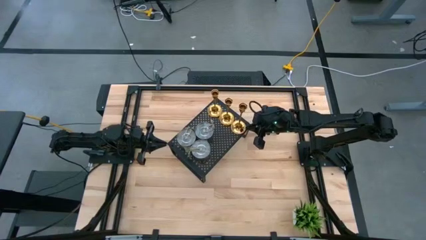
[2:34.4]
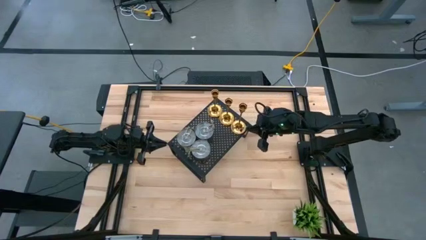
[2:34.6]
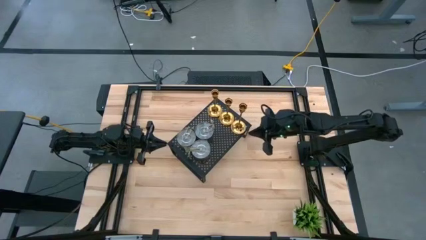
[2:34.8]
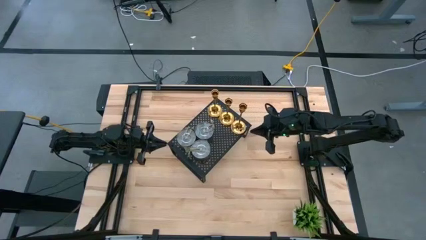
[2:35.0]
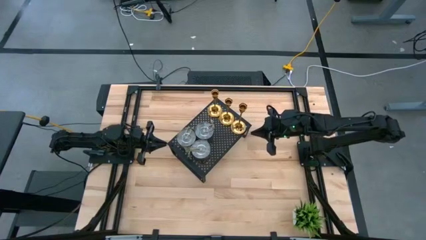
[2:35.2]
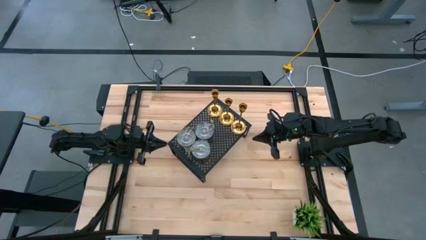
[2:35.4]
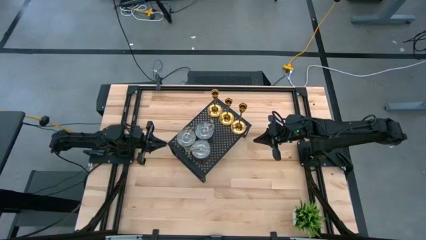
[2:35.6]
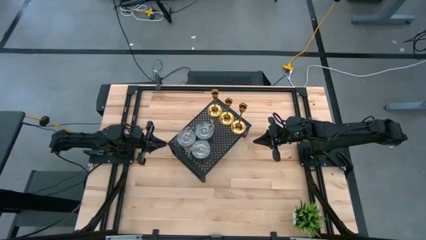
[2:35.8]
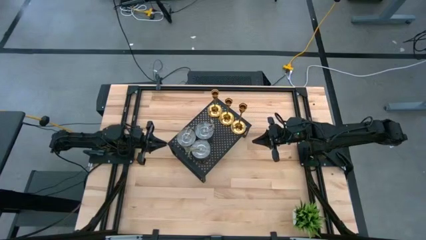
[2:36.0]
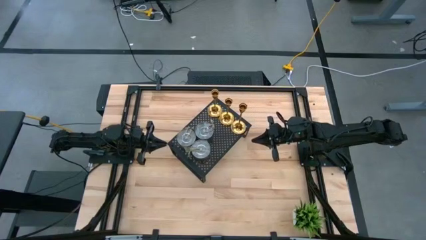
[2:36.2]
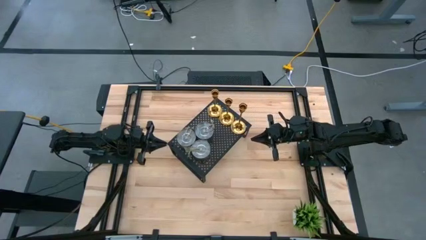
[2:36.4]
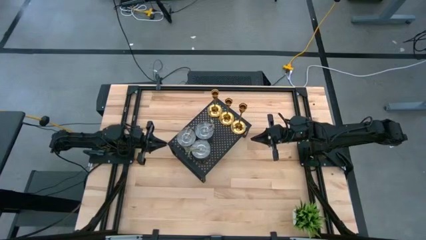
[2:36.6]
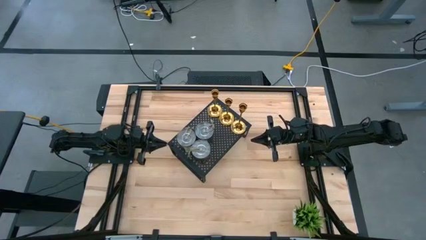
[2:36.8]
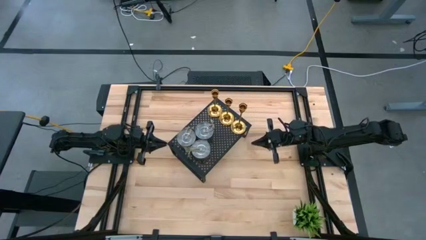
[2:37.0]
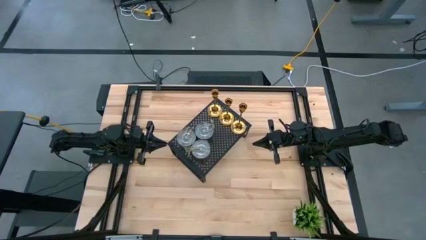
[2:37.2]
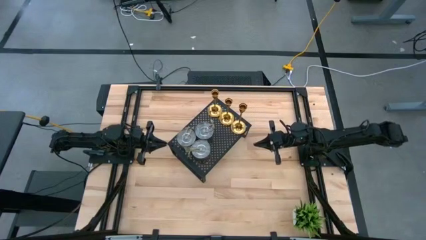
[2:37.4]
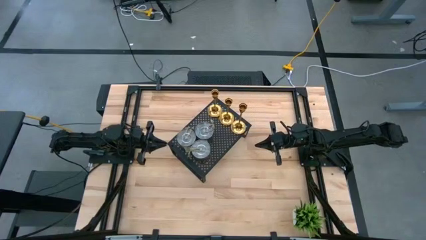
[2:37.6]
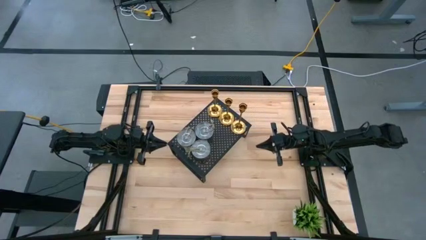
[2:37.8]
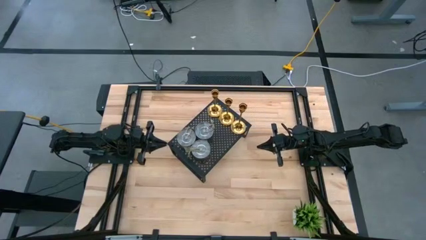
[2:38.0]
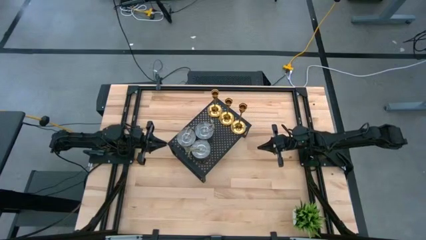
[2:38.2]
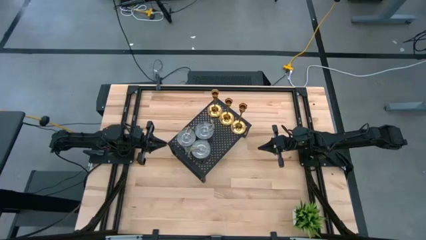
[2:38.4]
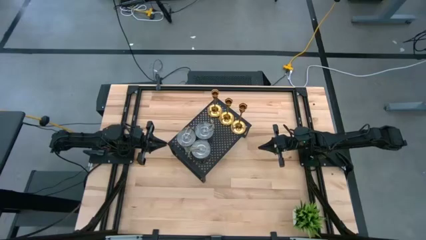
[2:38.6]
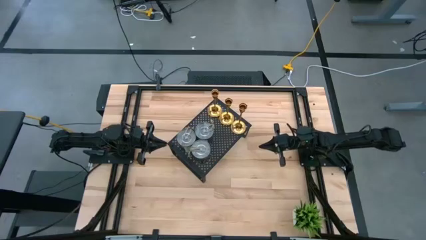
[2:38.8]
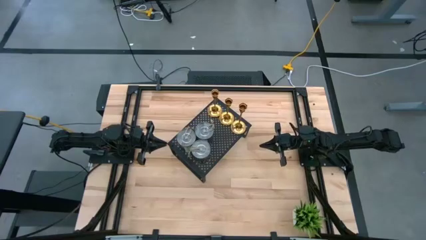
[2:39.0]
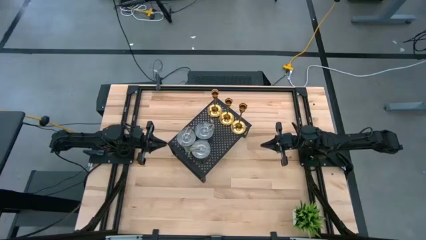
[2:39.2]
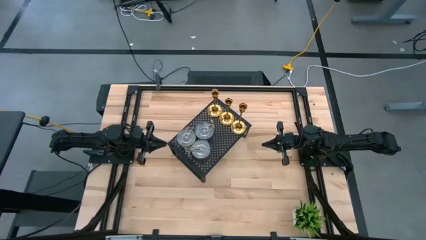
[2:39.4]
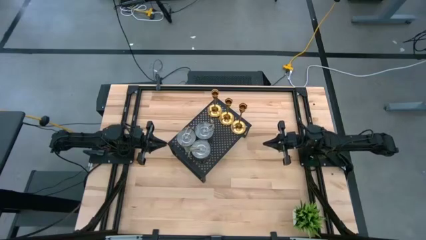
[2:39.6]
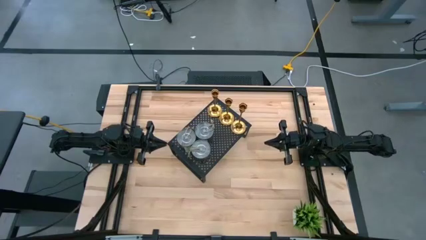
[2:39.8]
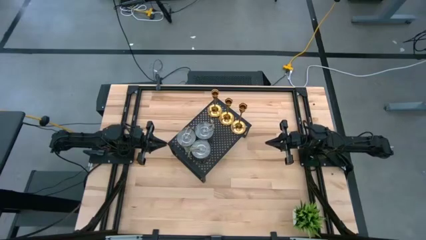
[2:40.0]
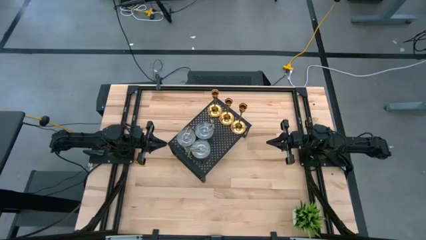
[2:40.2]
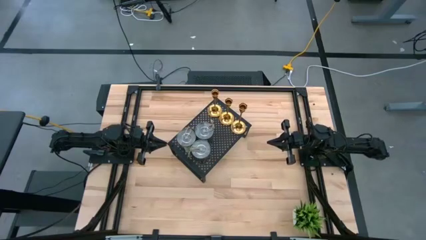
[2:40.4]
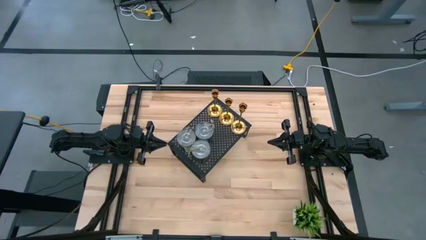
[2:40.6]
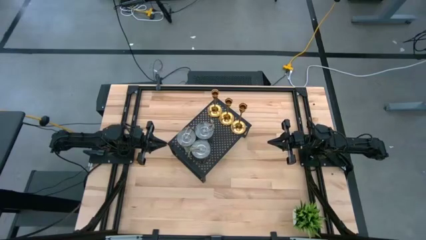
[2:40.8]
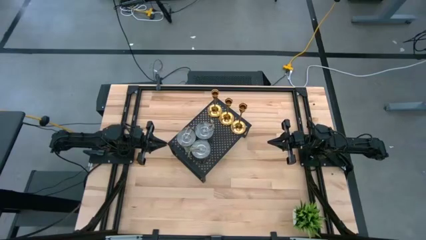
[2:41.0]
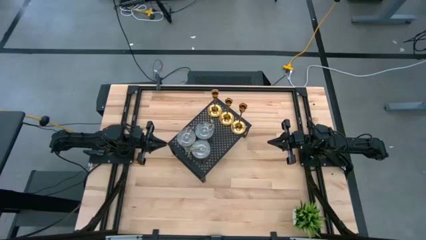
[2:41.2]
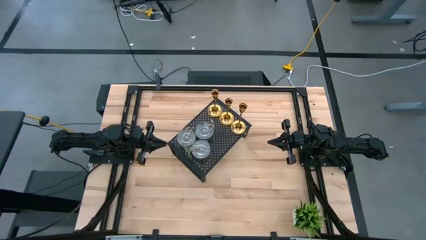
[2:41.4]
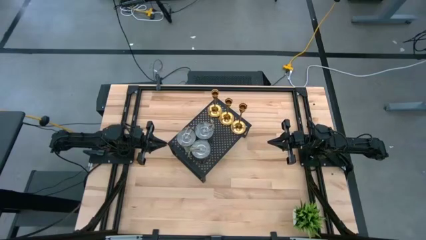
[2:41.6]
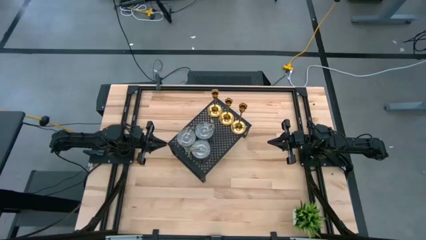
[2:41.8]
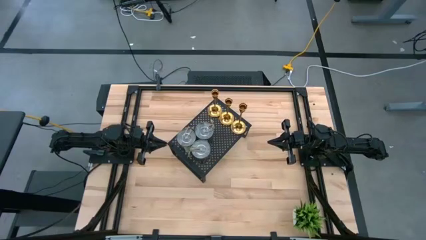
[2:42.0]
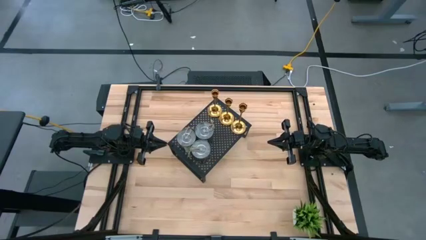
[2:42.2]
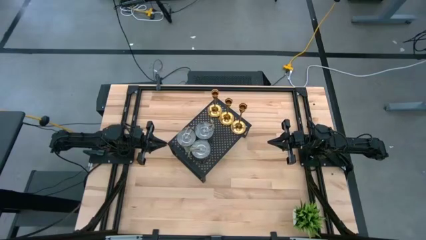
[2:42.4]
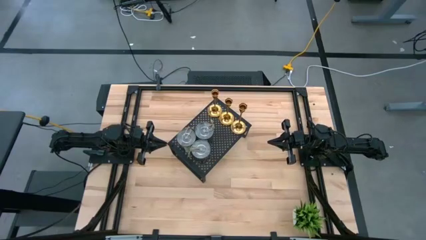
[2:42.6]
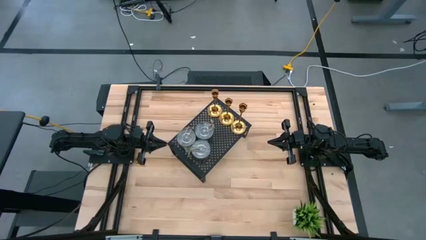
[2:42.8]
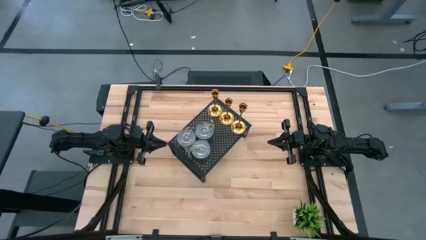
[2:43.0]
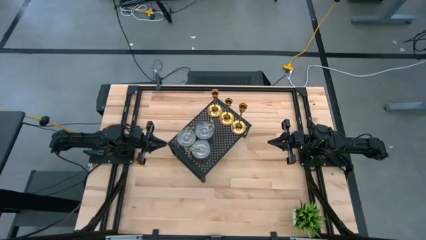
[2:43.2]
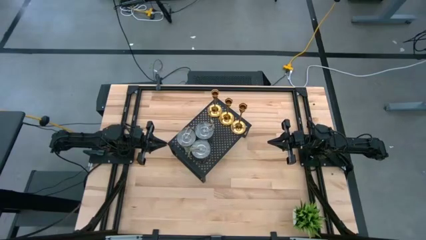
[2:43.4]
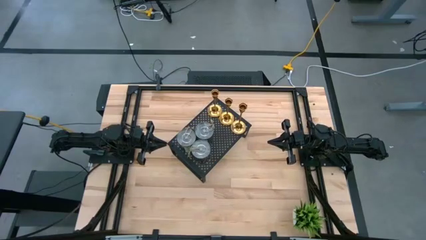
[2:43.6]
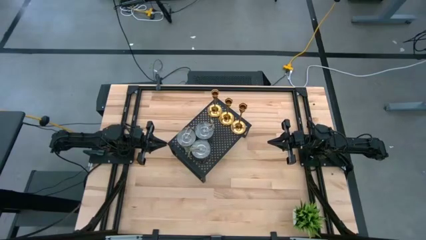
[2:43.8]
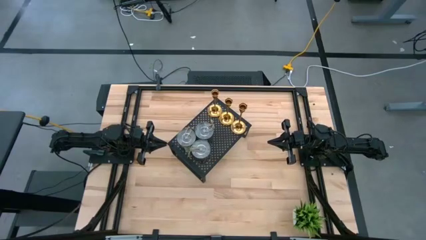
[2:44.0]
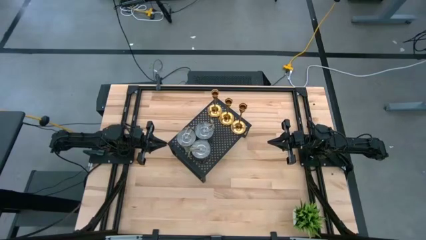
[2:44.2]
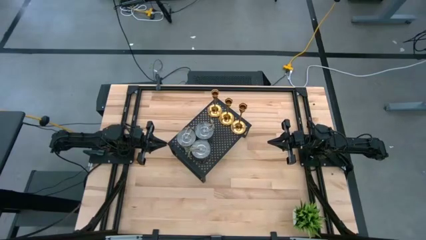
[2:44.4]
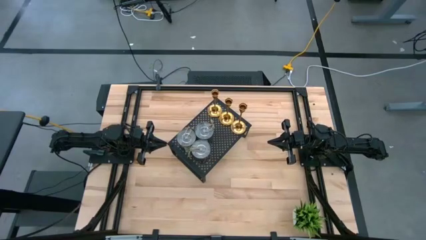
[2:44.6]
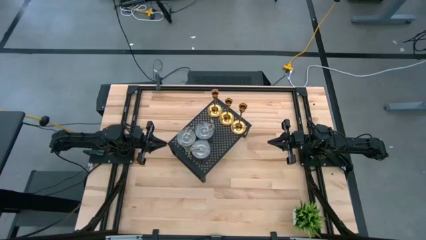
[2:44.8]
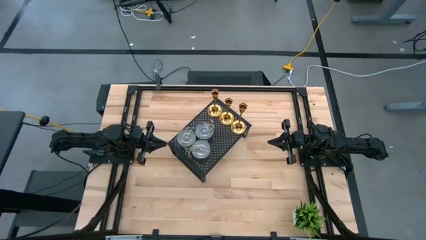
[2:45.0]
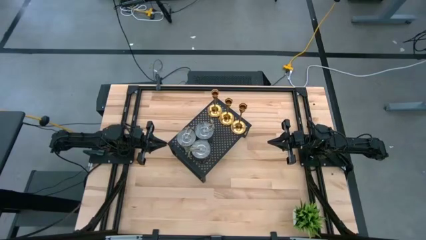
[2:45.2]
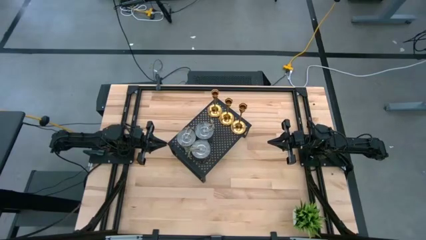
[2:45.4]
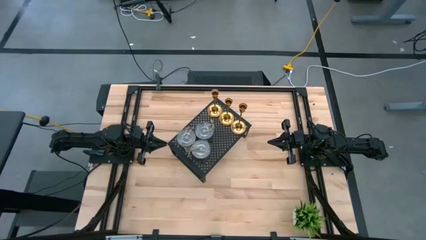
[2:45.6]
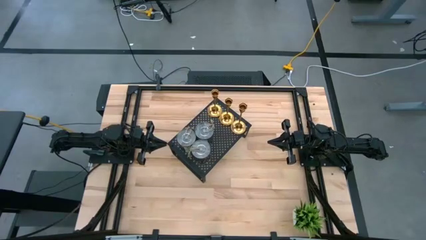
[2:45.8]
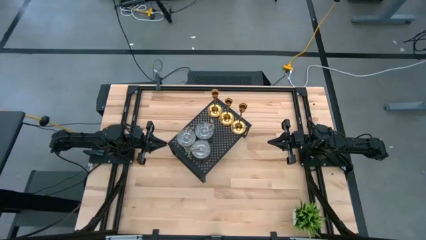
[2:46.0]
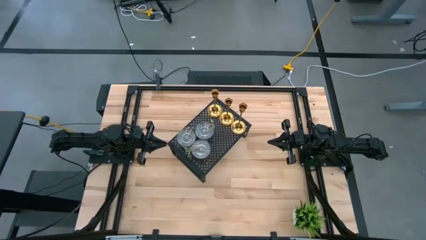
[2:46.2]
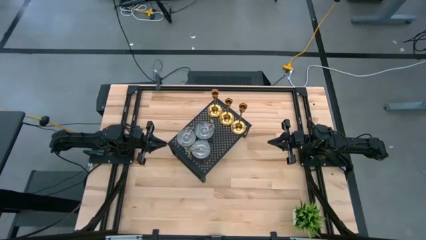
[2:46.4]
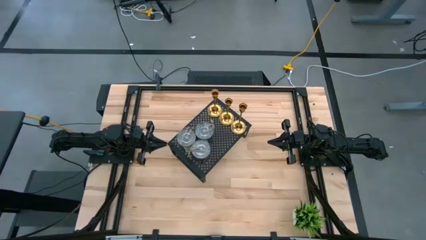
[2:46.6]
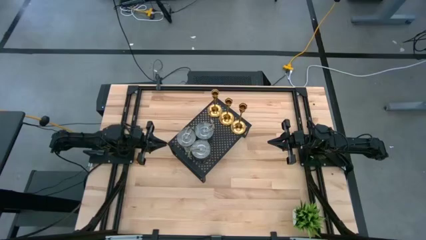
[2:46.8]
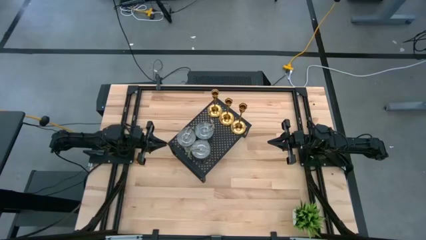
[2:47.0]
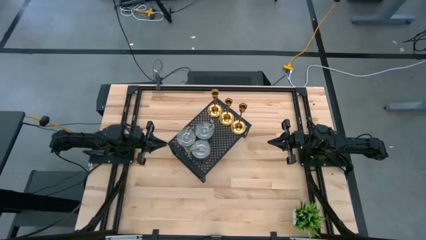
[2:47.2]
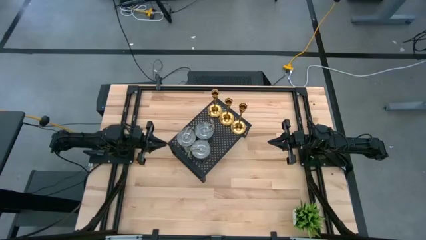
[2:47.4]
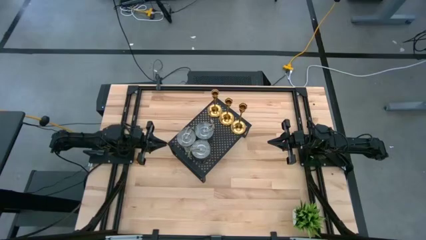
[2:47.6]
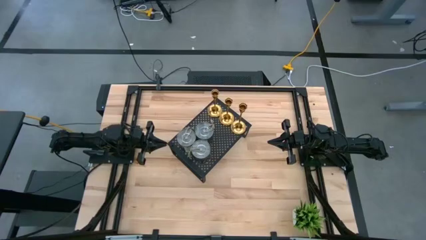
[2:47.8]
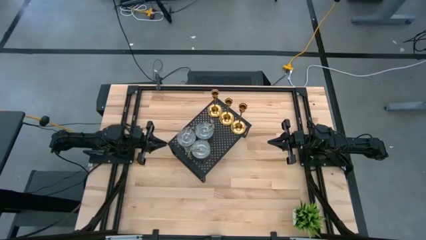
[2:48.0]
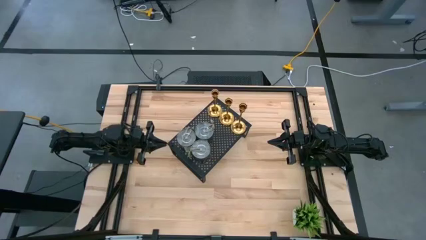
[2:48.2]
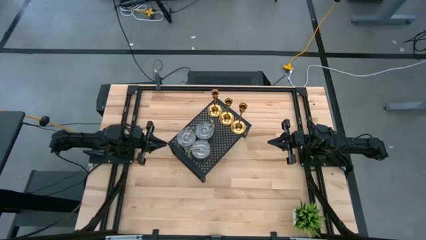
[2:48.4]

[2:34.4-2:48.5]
Task: Pick & Place candle stick holders
Return to Home Position
